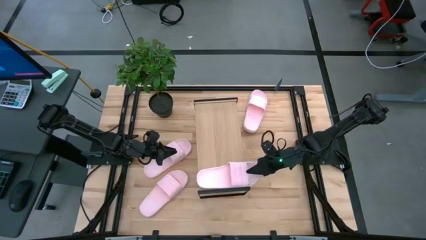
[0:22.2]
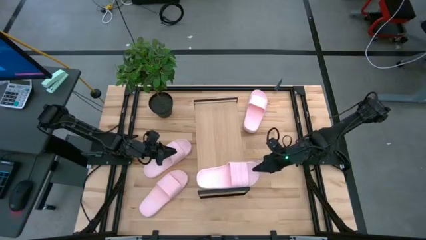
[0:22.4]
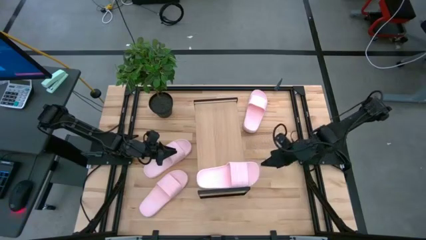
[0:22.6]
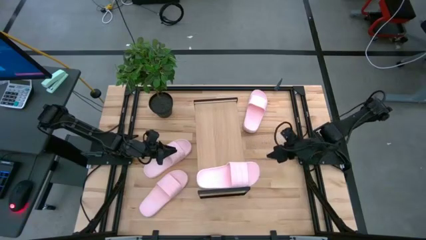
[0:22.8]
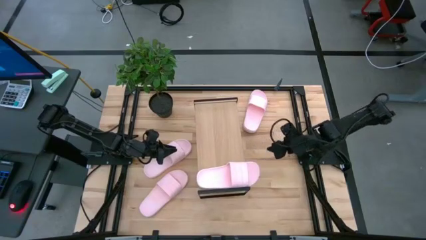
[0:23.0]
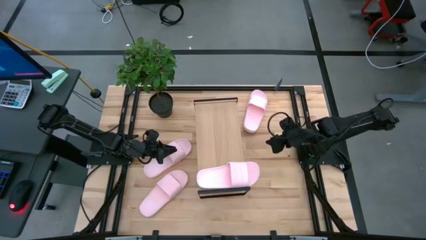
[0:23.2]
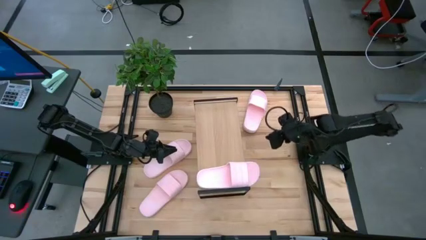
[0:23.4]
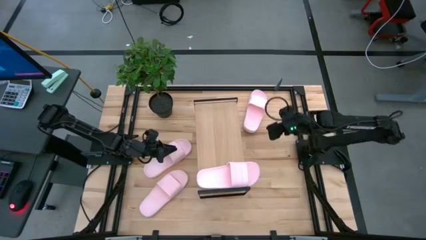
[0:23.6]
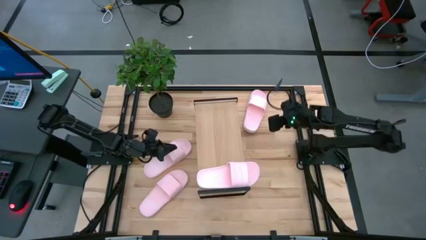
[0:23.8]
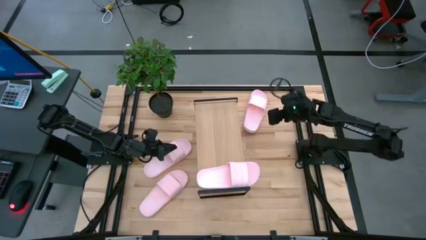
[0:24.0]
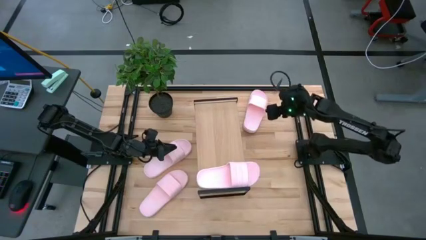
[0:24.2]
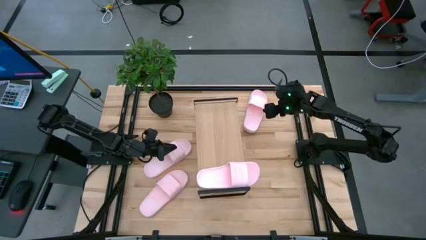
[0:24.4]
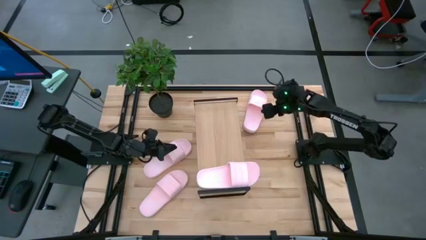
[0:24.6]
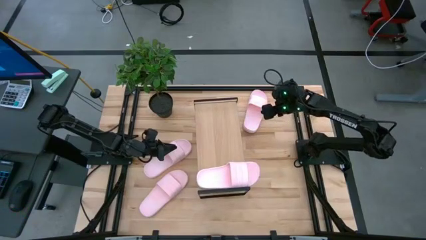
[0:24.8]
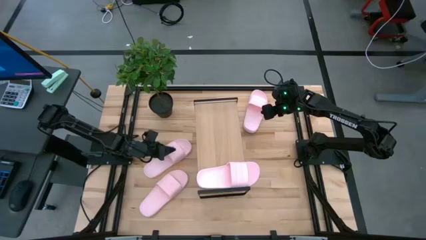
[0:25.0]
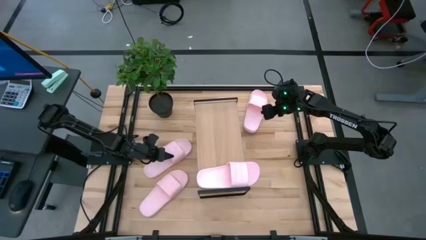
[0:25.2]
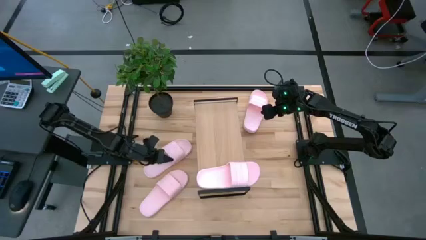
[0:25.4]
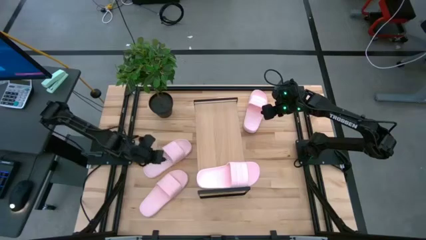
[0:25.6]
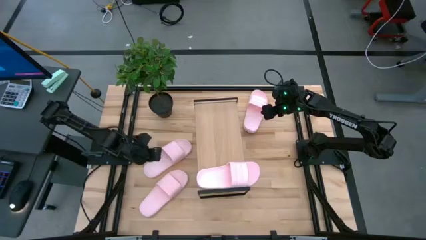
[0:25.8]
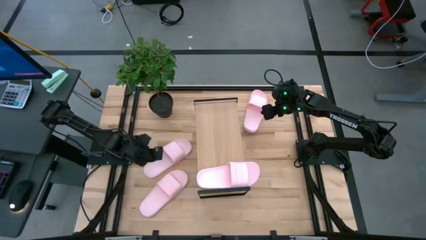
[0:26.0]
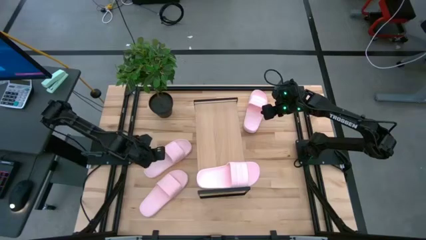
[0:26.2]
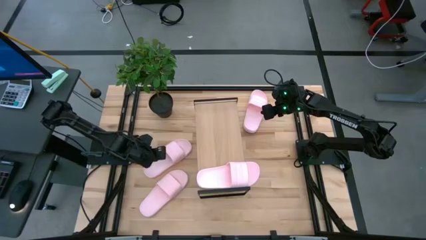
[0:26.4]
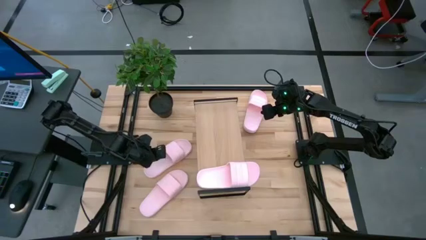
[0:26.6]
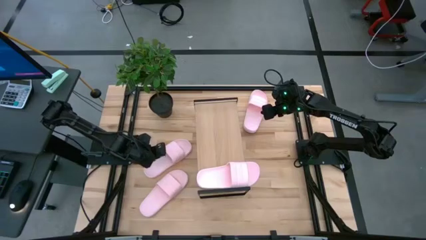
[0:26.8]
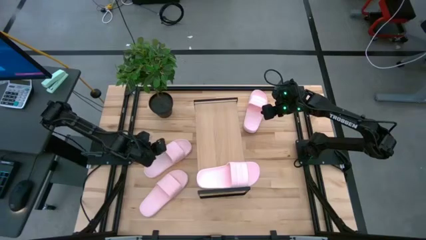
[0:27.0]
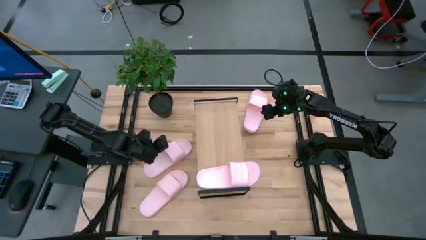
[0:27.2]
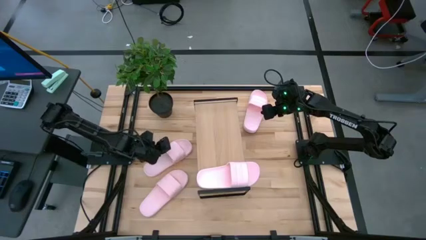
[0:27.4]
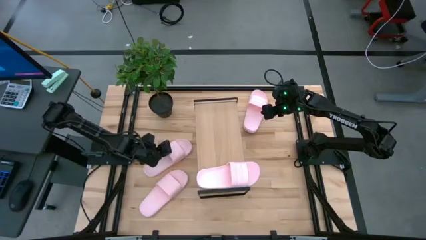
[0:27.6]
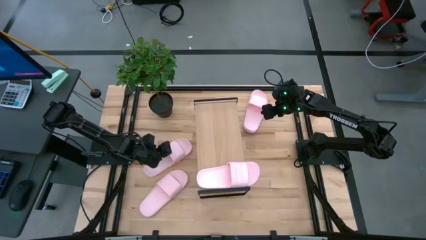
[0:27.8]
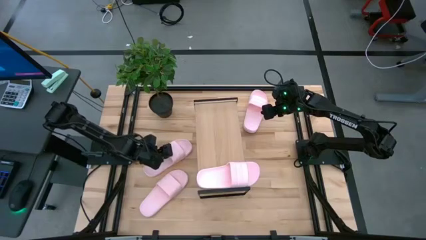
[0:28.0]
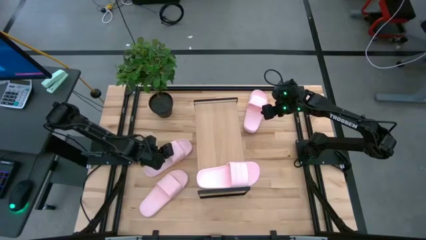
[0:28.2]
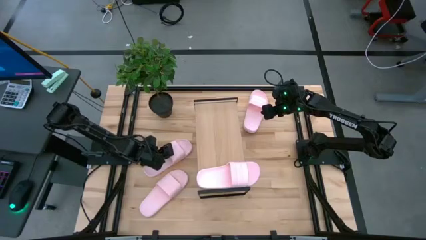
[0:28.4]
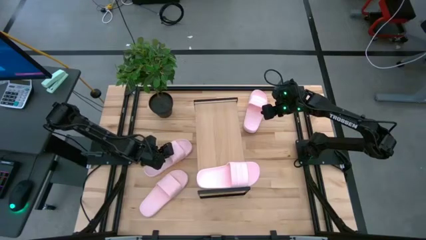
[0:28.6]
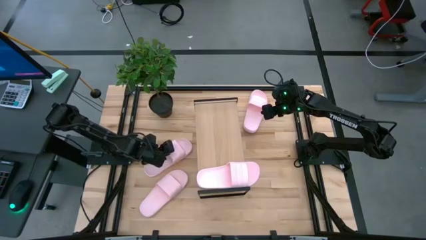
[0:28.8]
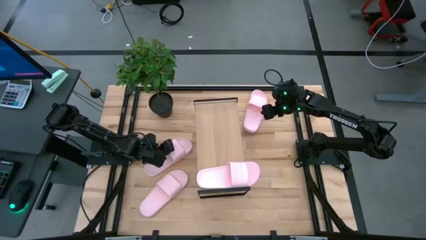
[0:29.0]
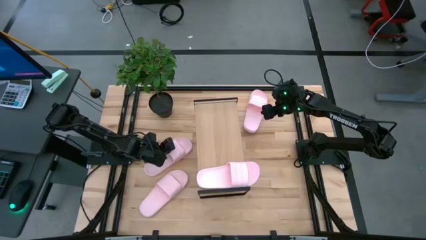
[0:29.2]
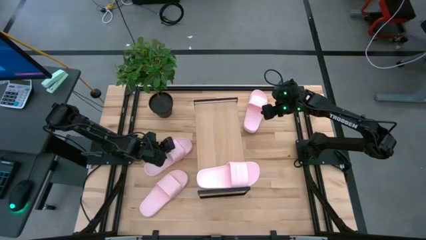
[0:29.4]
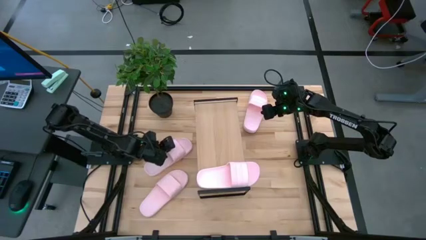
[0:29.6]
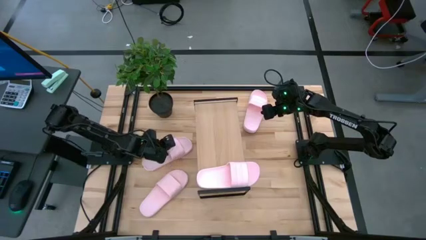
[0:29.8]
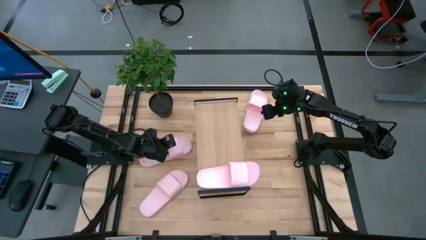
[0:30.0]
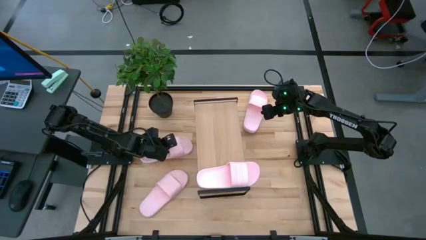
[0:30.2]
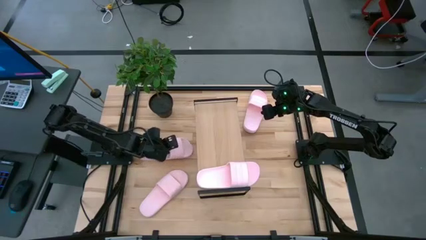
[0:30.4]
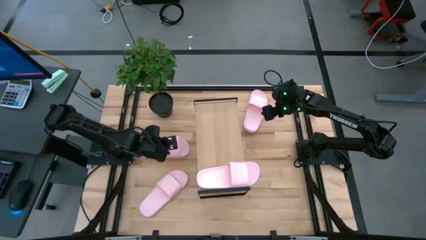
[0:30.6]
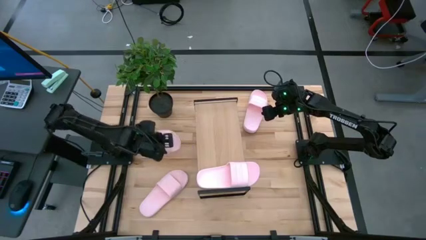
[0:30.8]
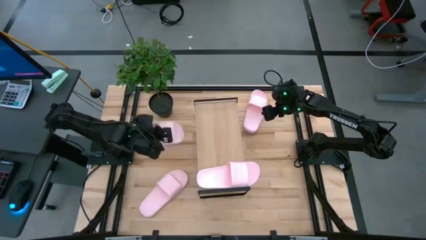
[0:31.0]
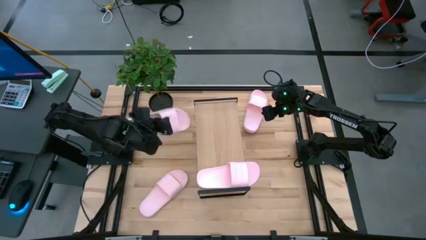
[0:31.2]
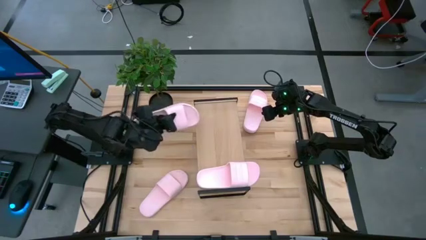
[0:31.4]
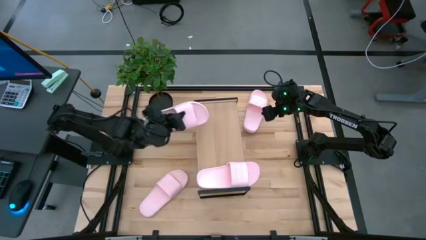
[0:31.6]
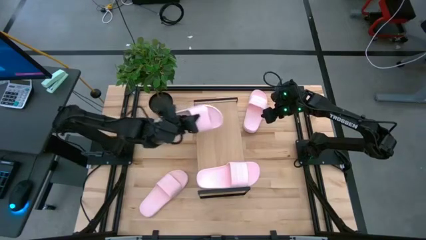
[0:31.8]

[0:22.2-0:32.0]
Task: Pick and place slides into the shelf
Put the top left pink slipper on the shelf

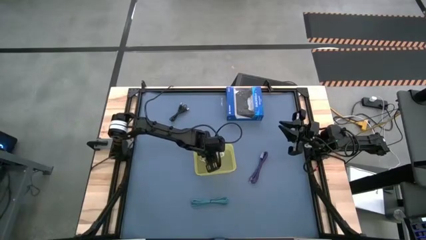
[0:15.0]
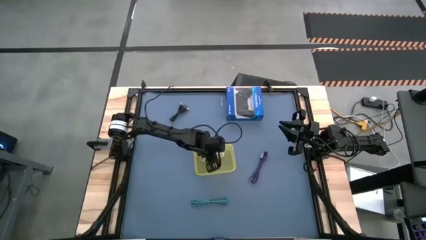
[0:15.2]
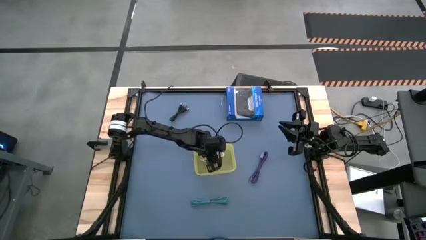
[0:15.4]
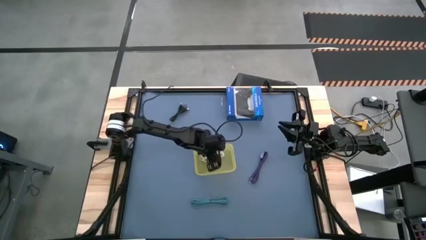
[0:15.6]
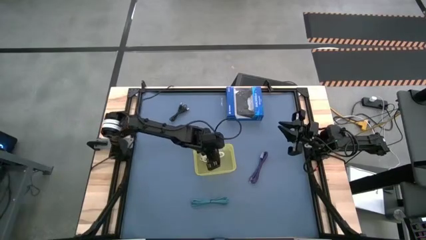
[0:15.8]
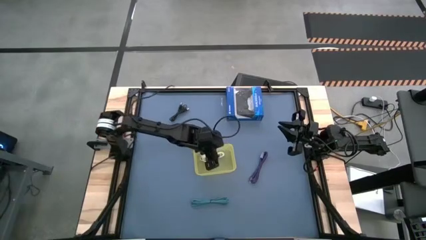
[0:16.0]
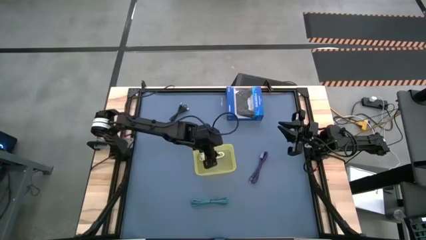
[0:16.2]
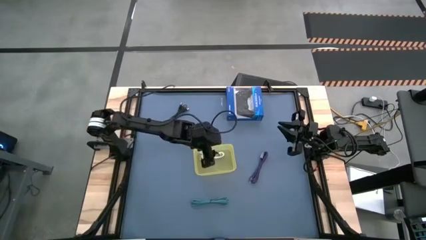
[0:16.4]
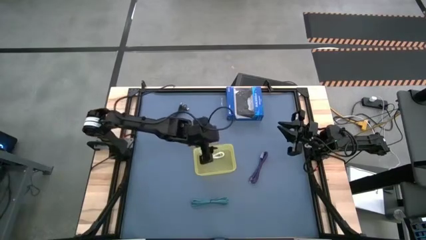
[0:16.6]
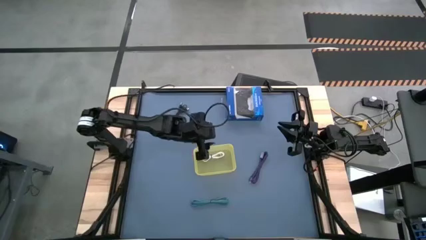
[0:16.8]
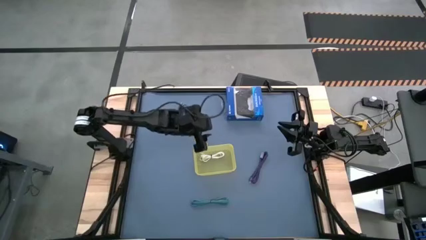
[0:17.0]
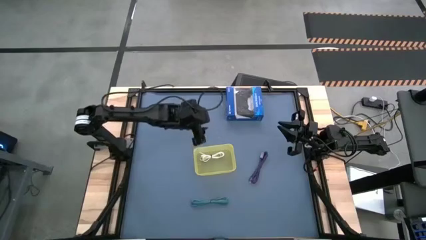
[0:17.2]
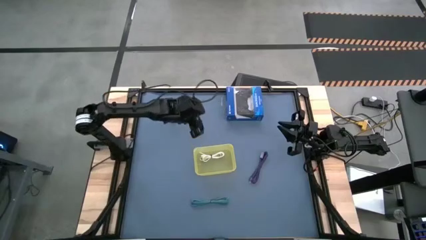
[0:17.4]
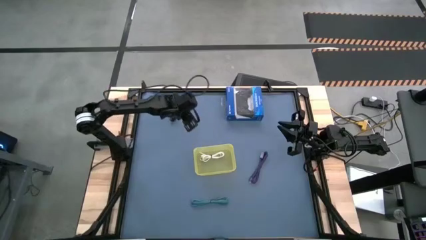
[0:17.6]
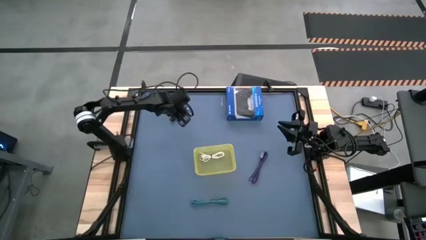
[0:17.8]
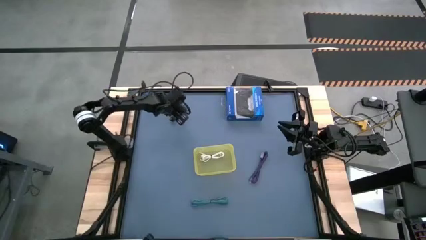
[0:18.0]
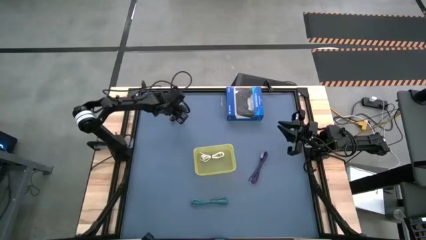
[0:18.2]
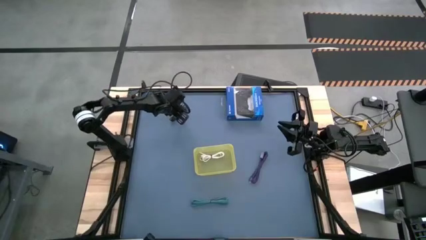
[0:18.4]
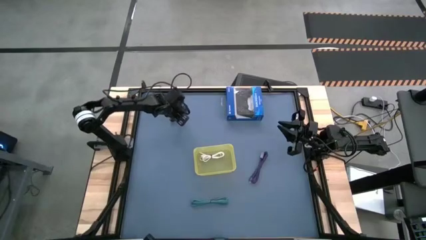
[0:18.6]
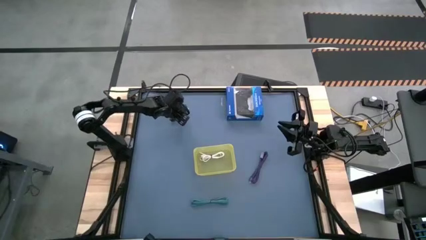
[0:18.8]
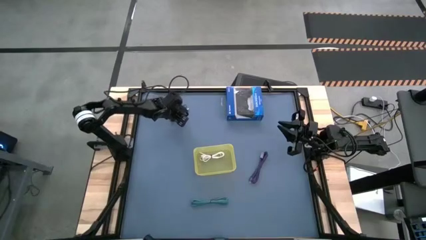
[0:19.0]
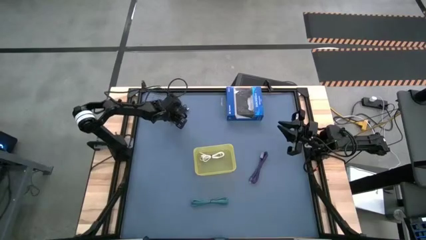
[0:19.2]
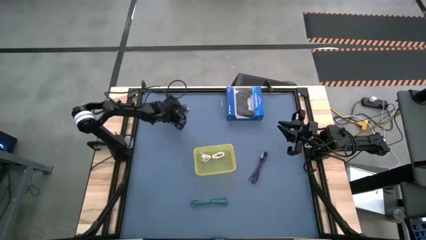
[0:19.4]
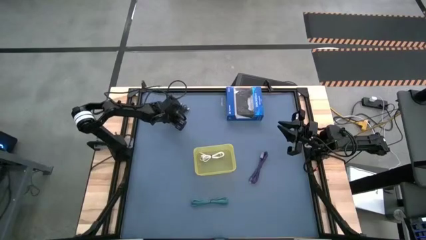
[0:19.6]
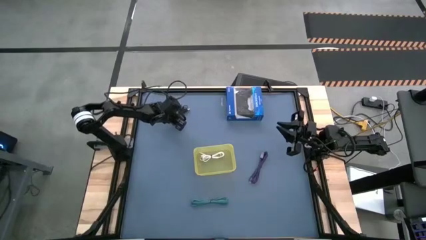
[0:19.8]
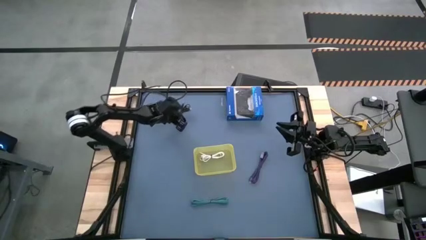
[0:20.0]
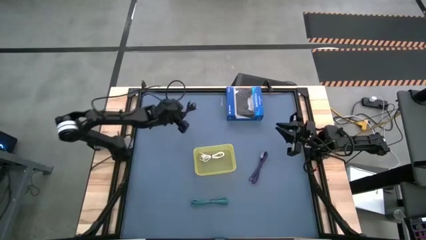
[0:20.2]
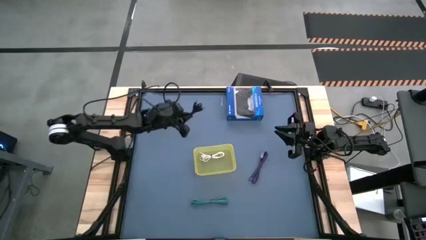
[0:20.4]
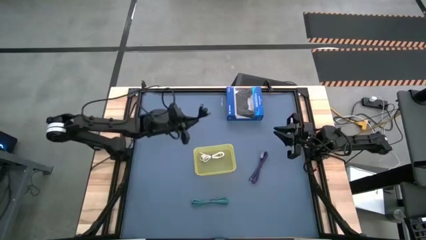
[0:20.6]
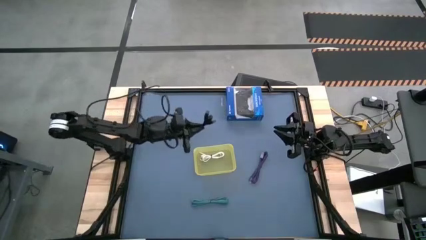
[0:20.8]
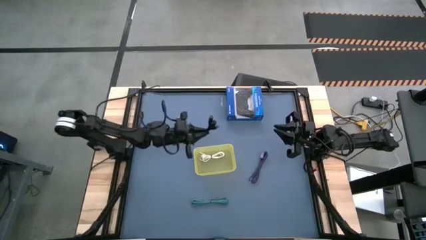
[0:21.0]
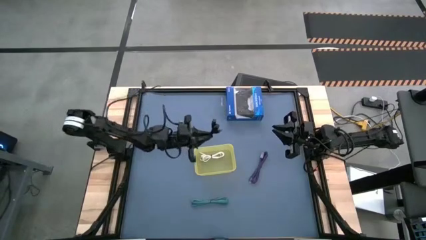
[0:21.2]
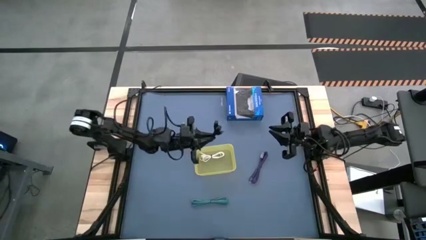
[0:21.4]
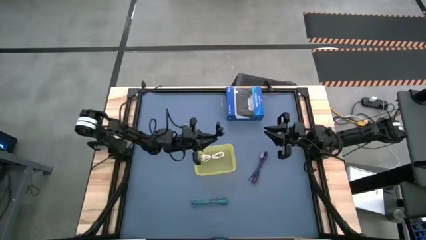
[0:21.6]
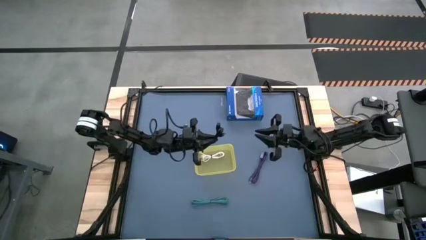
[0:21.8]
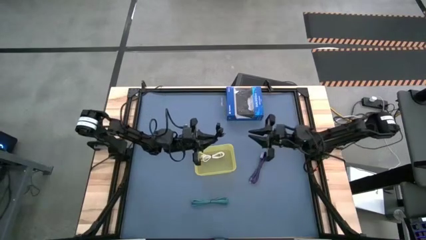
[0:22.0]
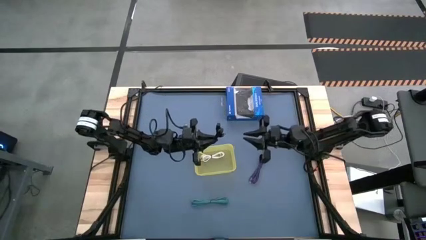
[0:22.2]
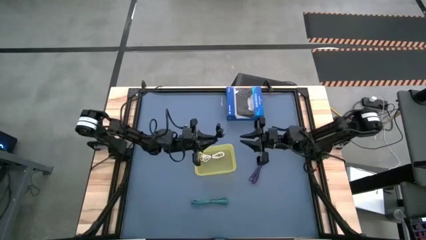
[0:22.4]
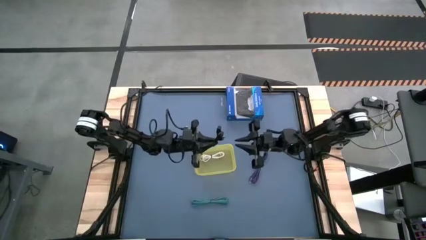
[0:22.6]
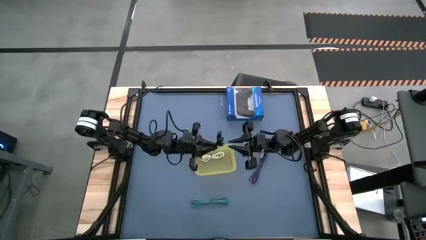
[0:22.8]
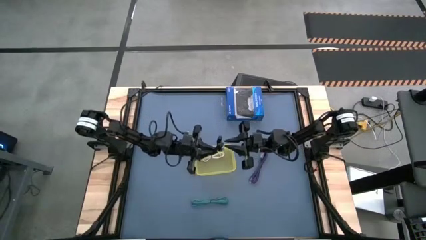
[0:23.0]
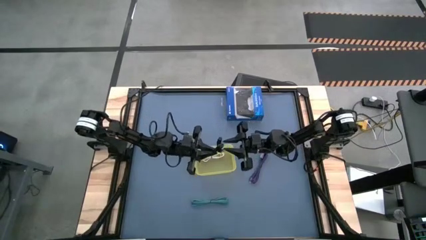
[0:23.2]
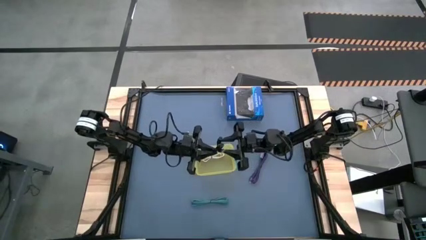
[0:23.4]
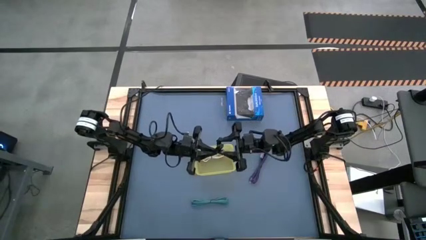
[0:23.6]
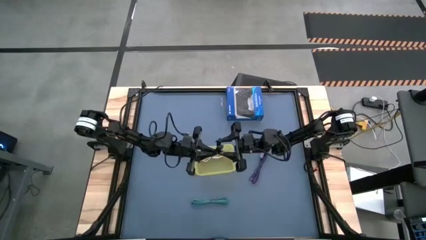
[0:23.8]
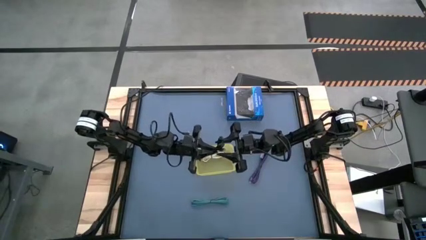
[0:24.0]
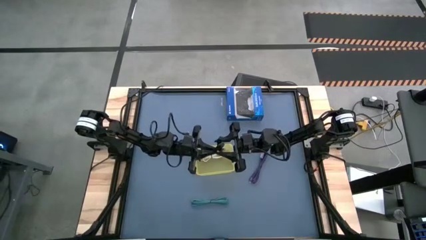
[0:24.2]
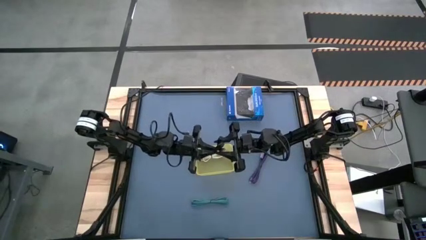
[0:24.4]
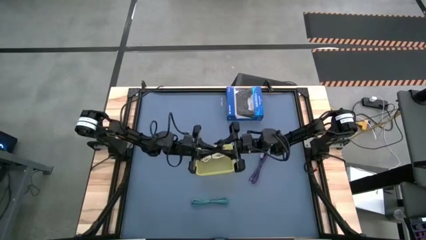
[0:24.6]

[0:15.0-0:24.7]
Task: Pick and place USB-C Cables
Put the black charger cable into the yellow bin
